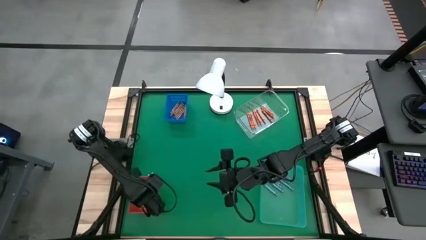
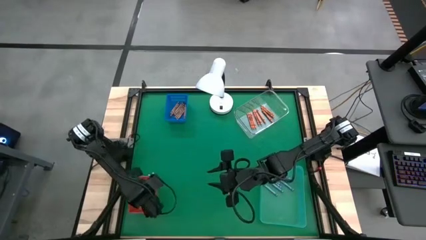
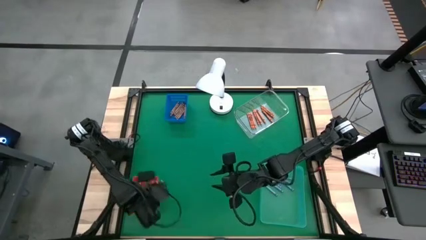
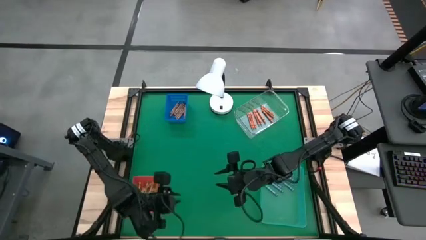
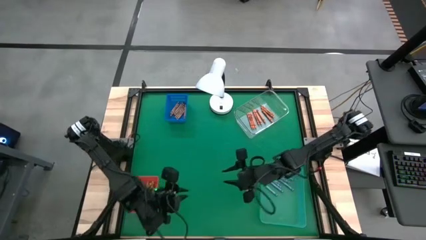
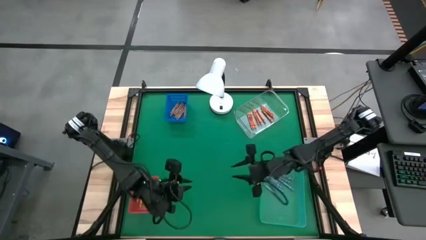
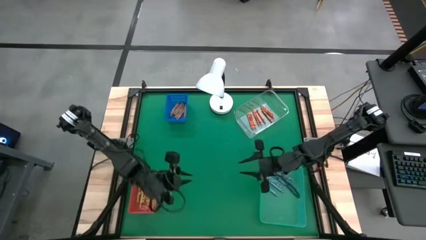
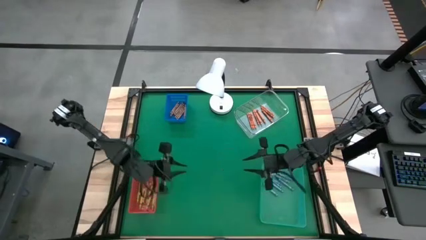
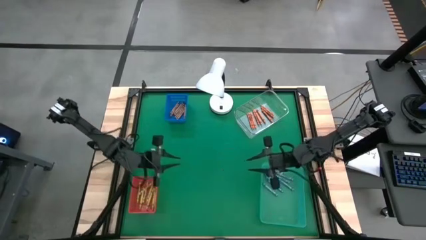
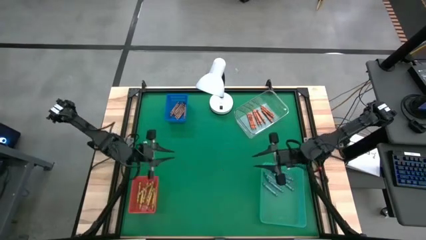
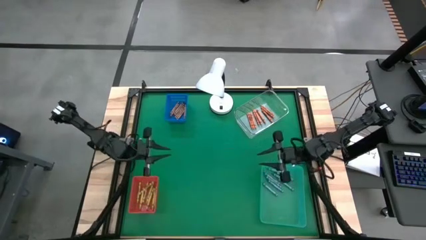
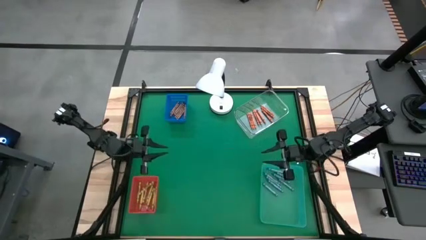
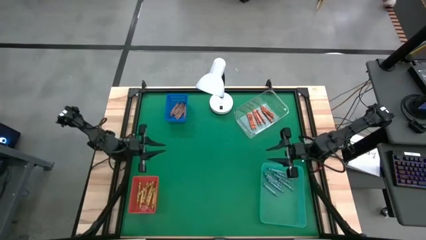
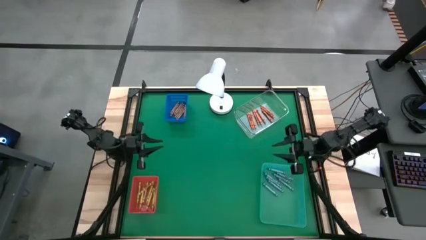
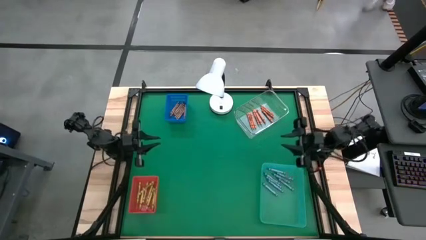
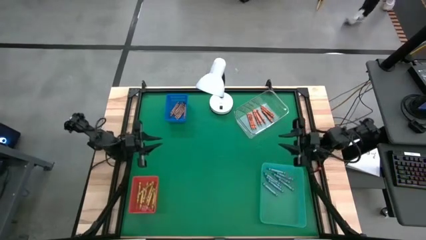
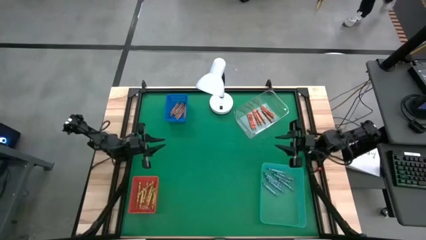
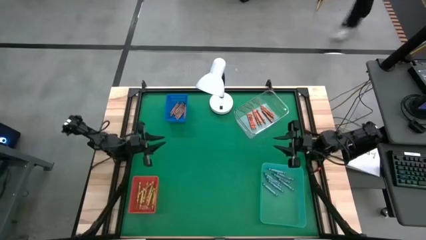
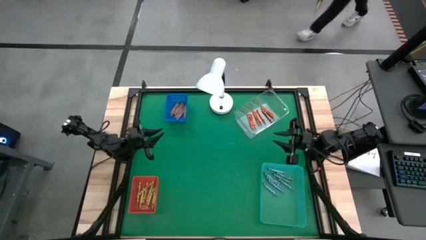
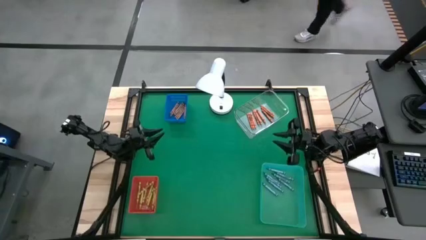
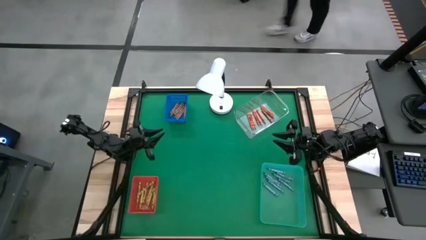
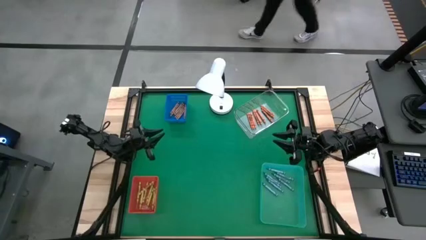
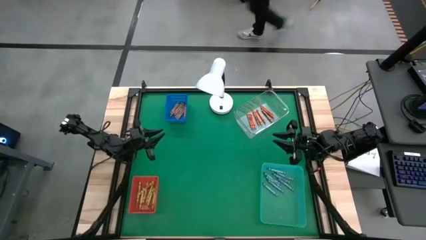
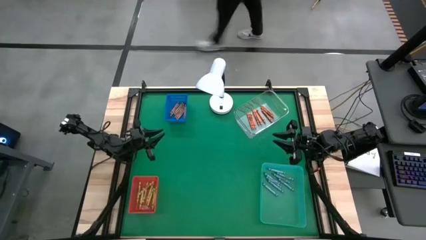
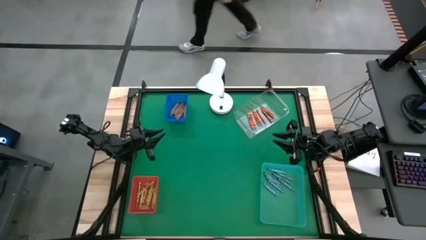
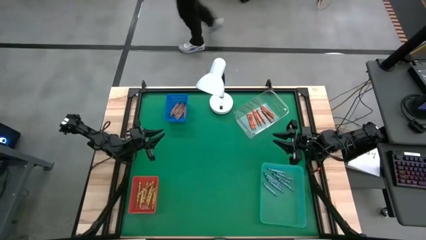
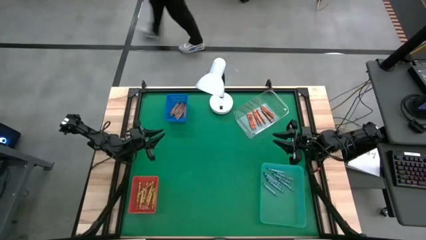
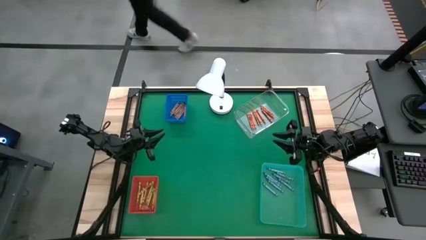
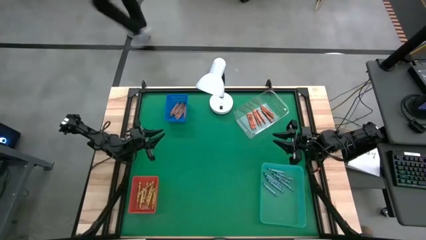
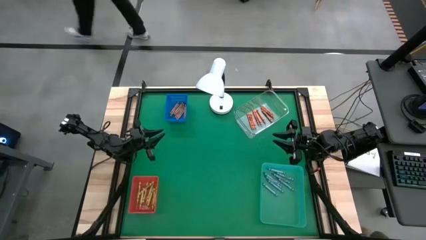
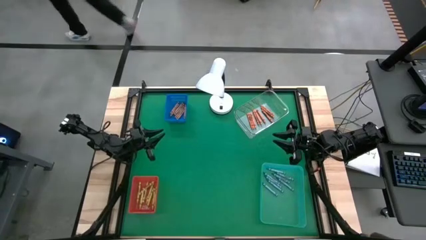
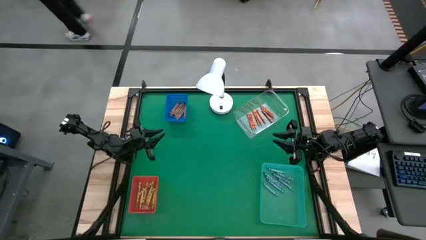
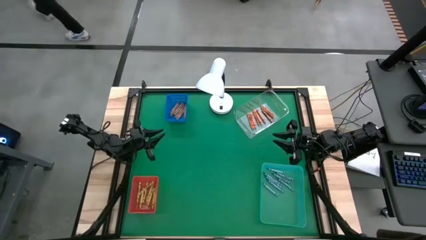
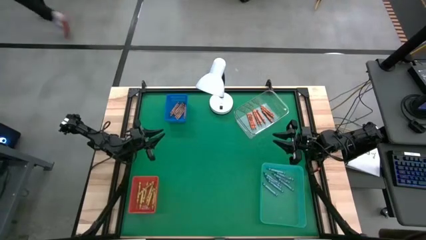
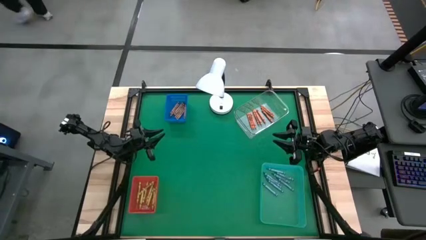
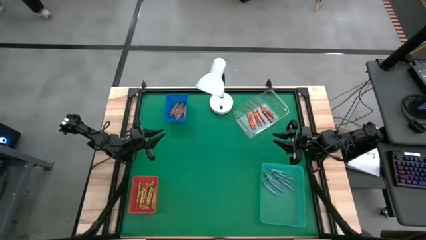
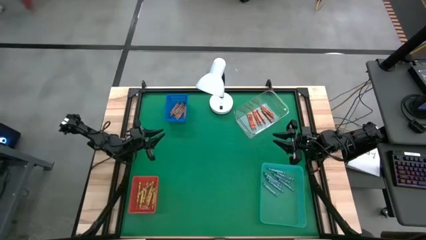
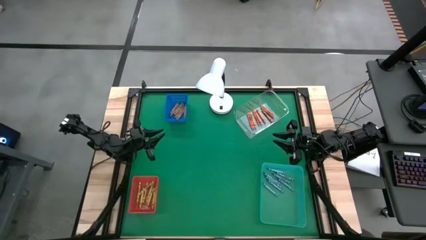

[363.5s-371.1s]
Task: Sort crayons
Return to Home Position

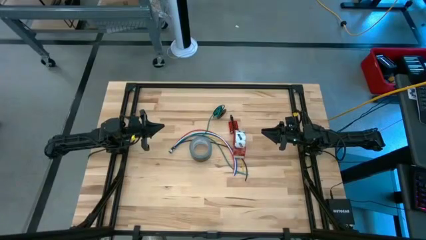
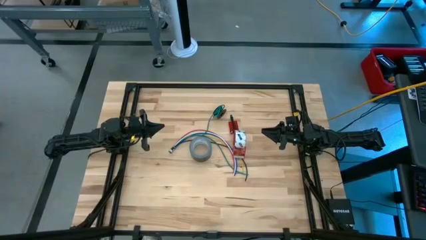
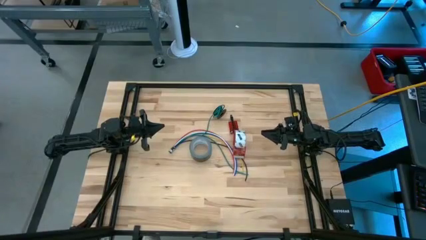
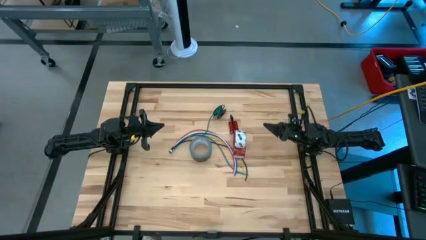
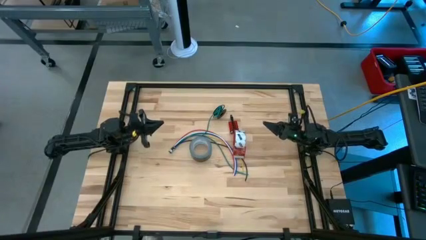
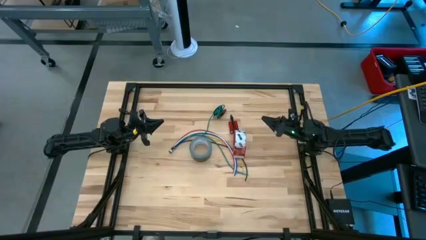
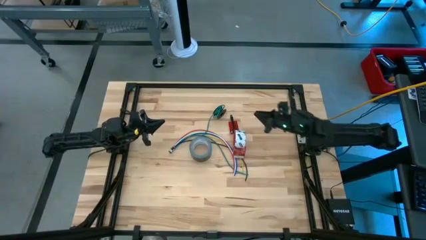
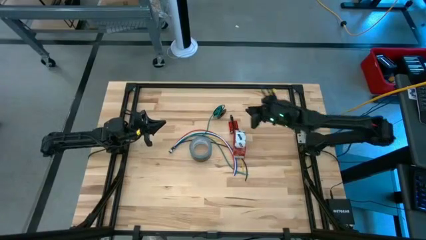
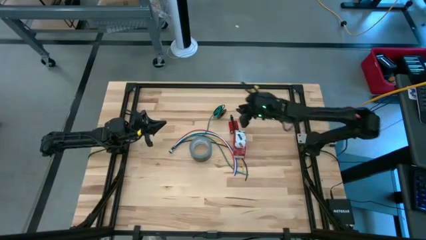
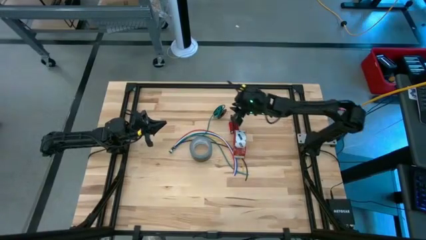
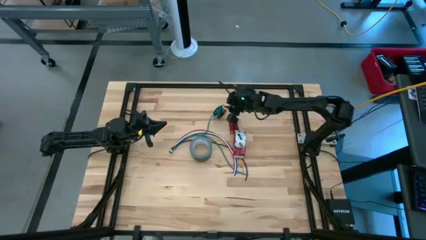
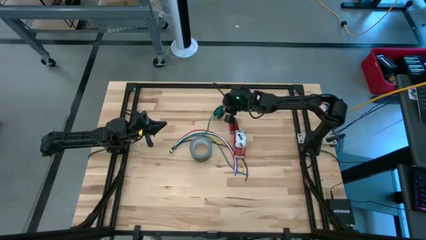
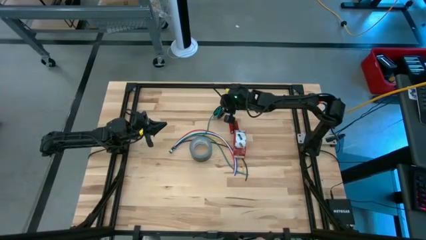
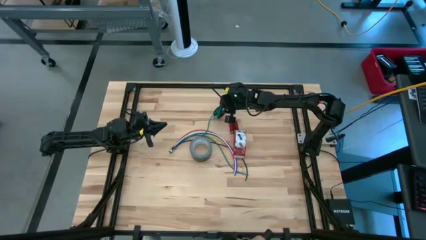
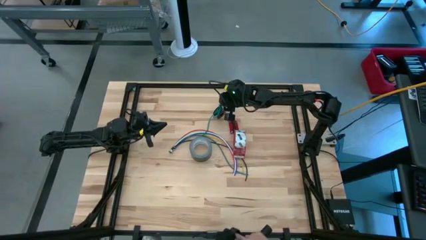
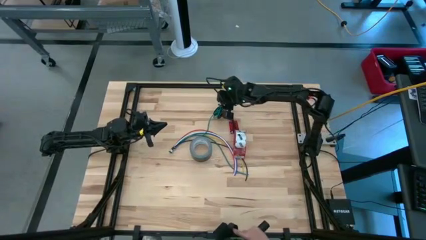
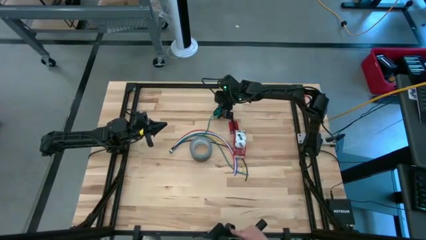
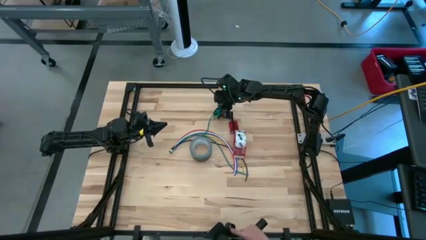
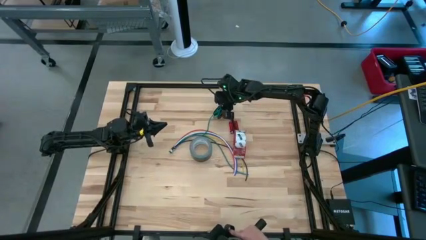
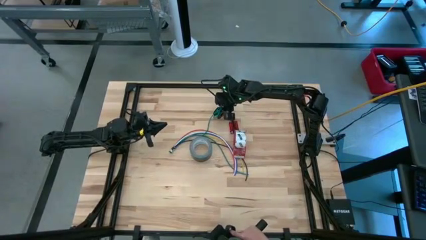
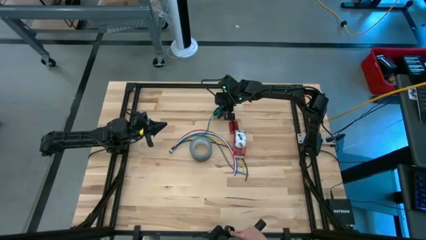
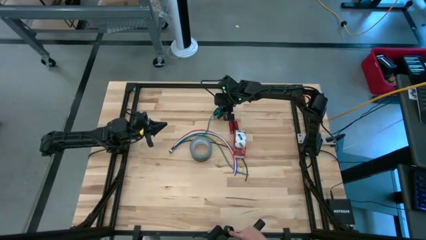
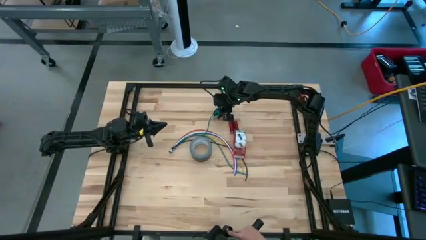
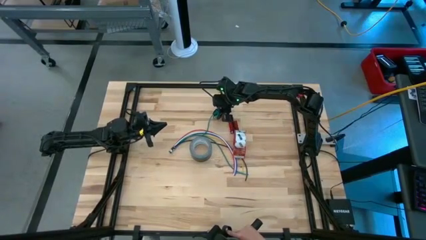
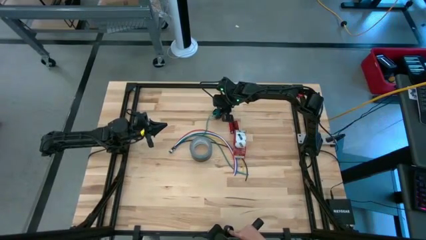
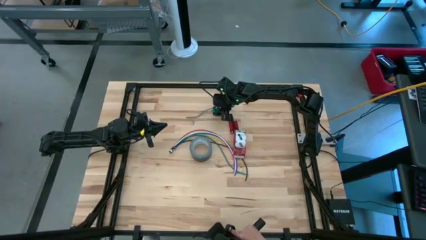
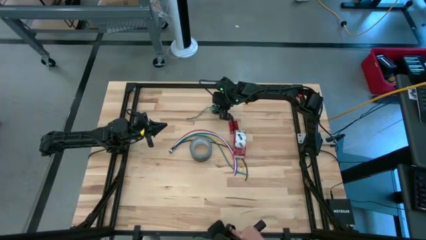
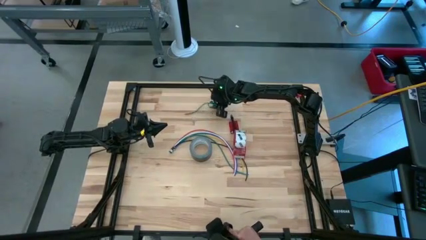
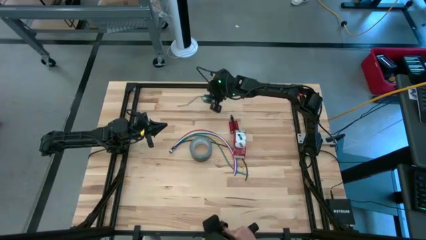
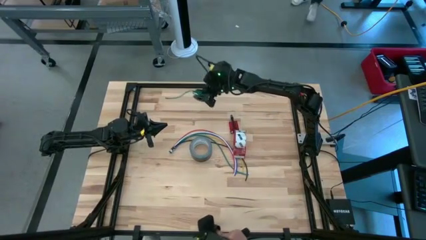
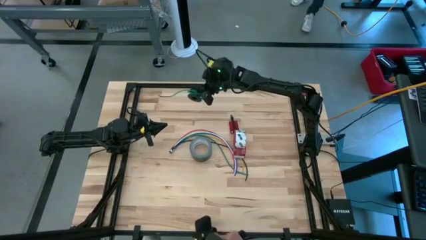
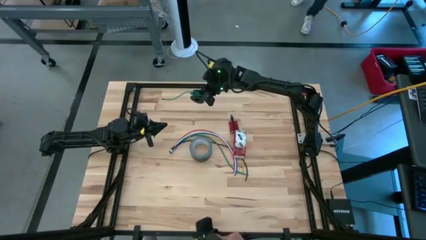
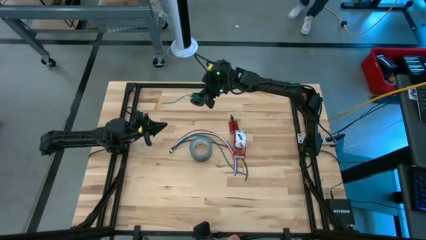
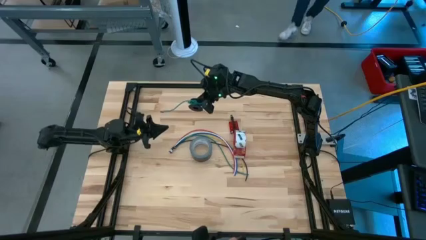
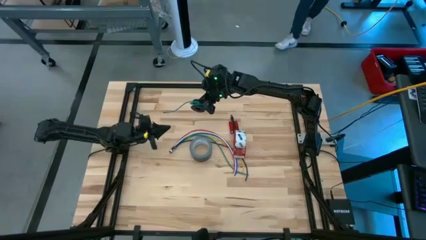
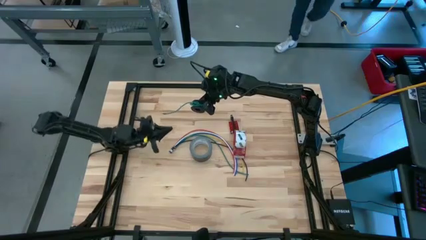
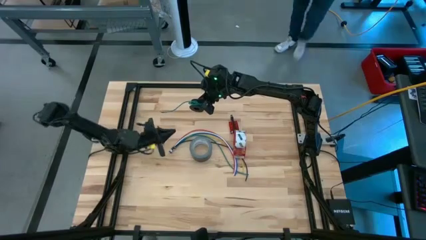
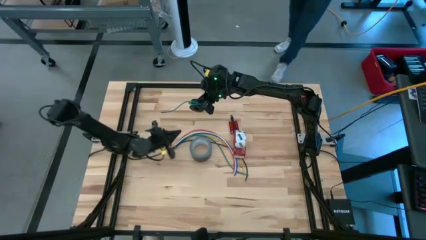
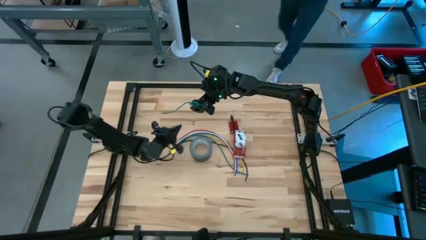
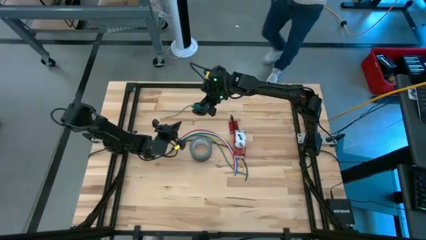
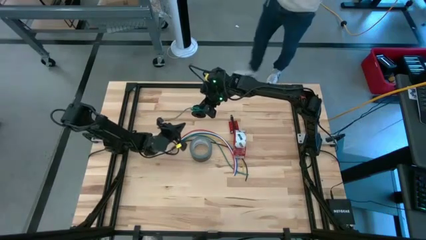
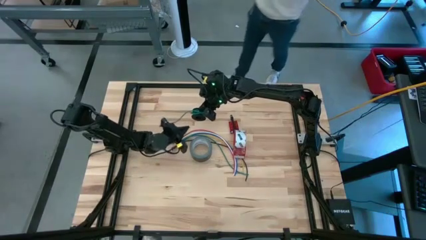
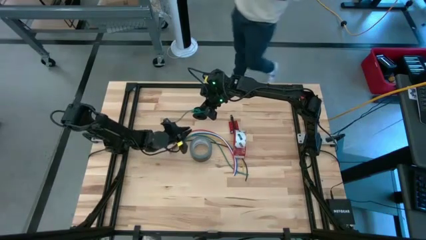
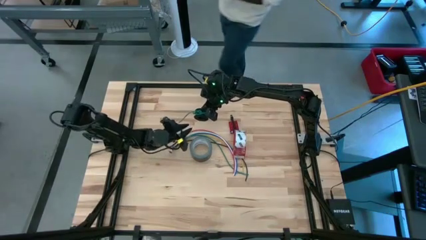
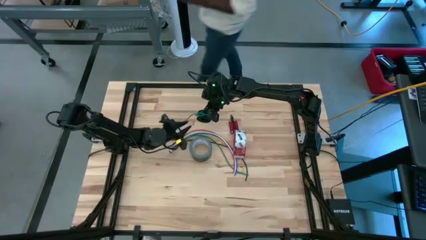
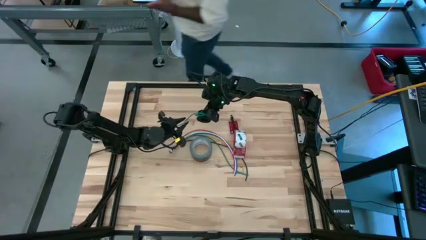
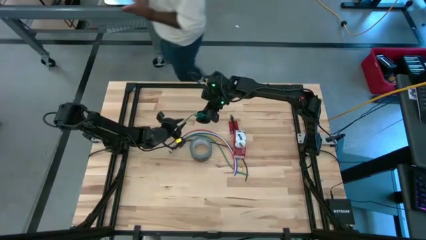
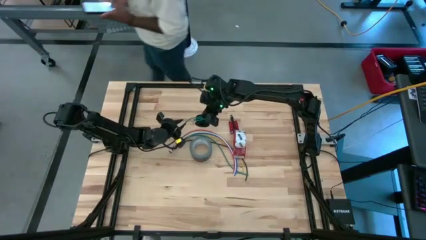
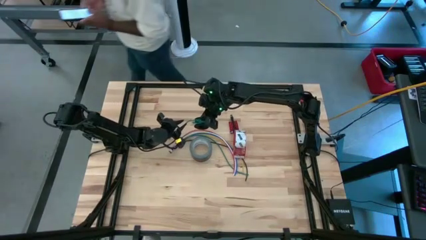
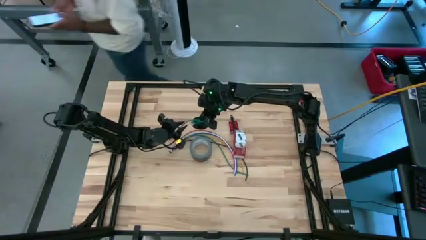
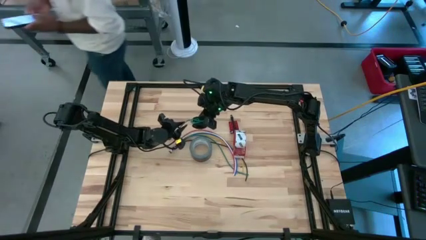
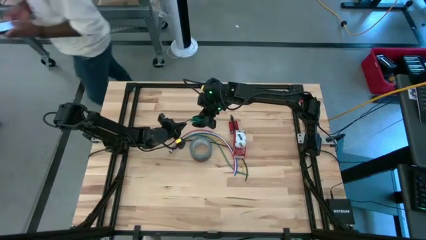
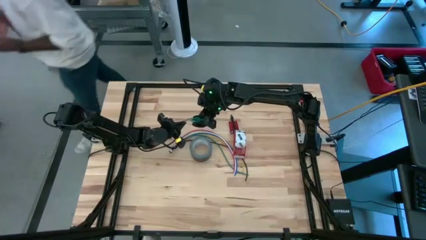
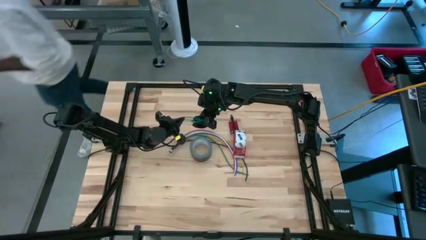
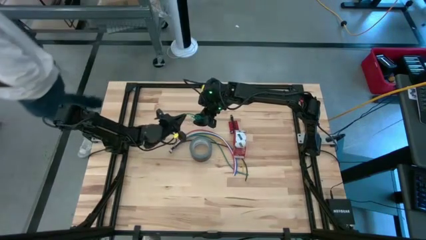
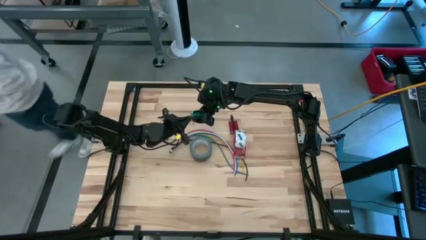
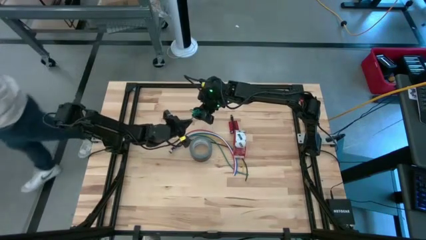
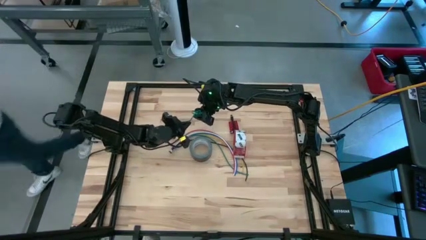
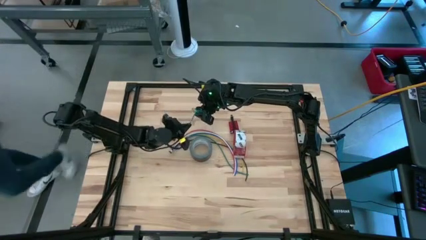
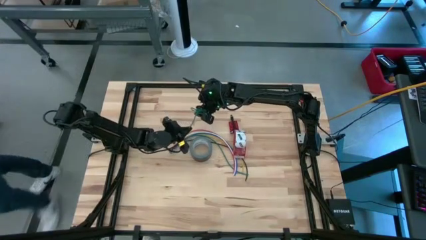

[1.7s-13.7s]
Task: Coil cords
Uncoil the green wire from the black spool
